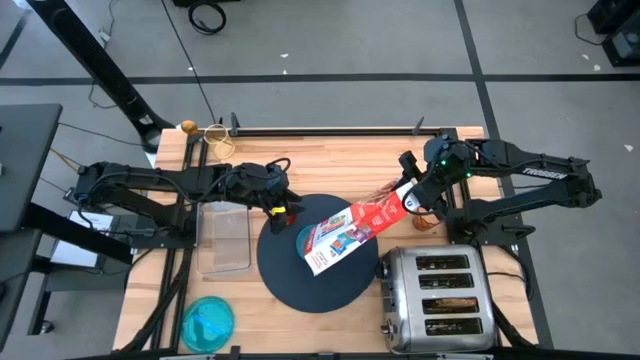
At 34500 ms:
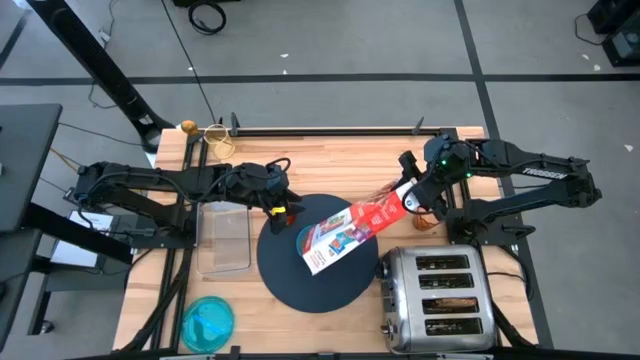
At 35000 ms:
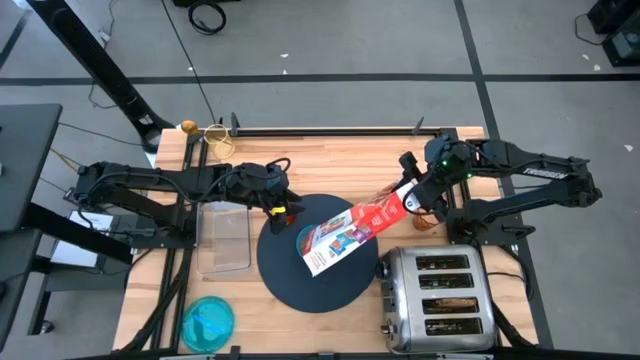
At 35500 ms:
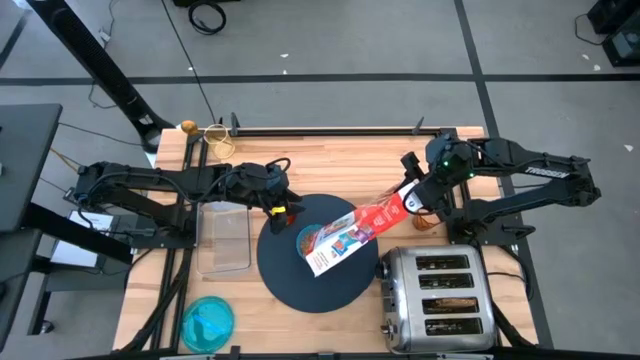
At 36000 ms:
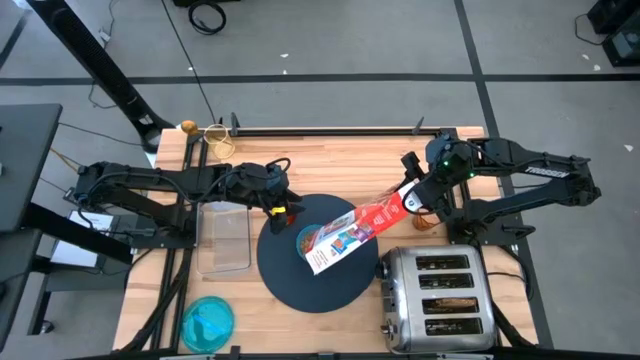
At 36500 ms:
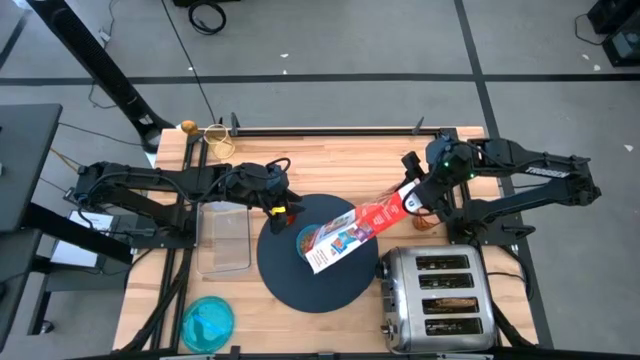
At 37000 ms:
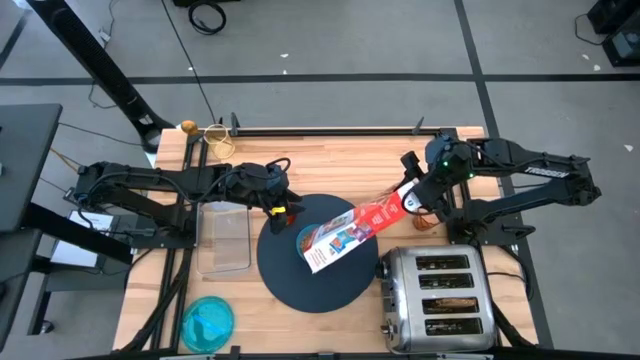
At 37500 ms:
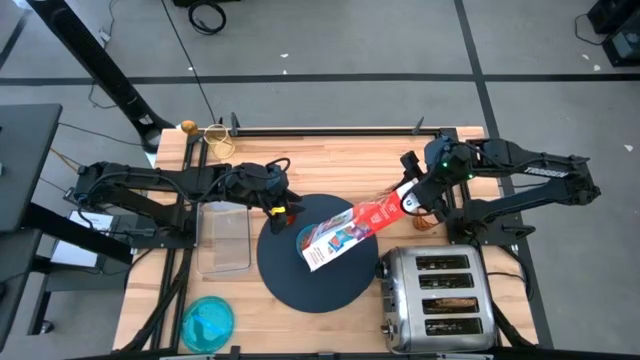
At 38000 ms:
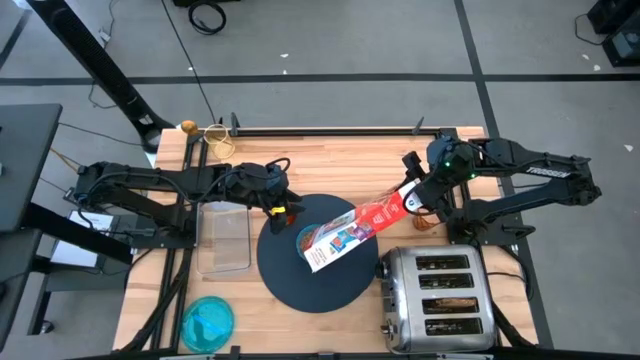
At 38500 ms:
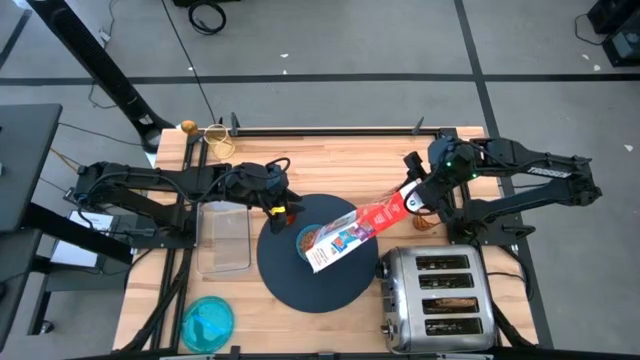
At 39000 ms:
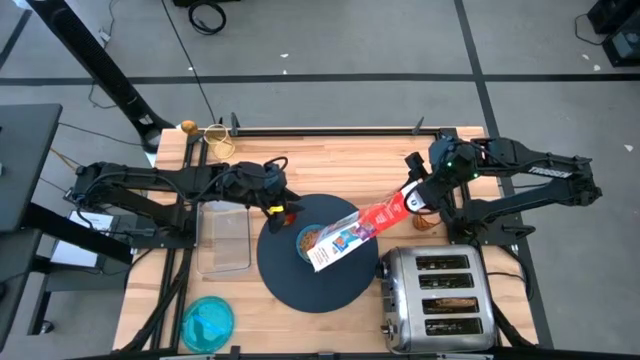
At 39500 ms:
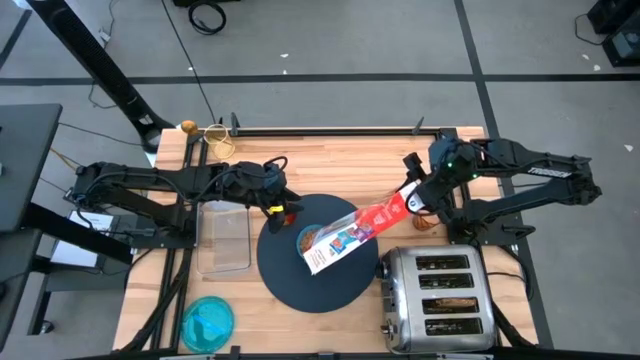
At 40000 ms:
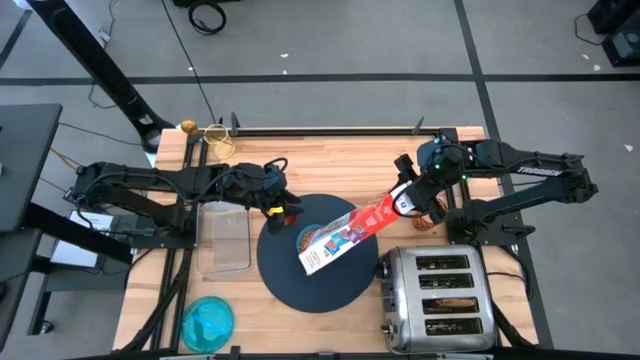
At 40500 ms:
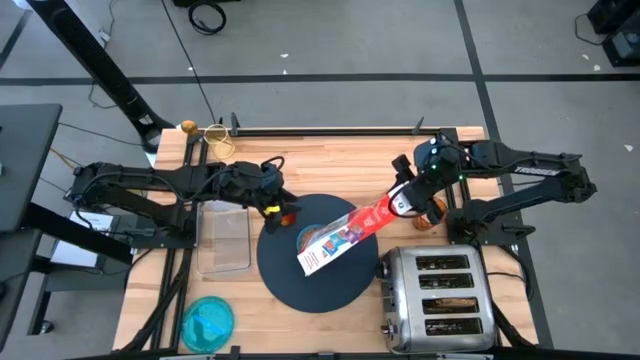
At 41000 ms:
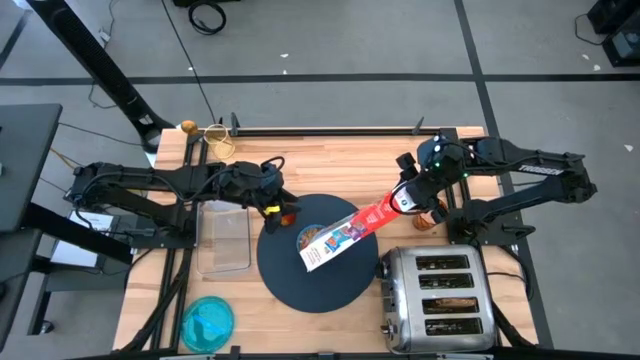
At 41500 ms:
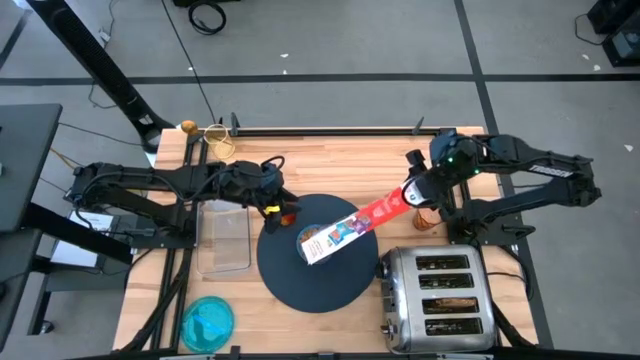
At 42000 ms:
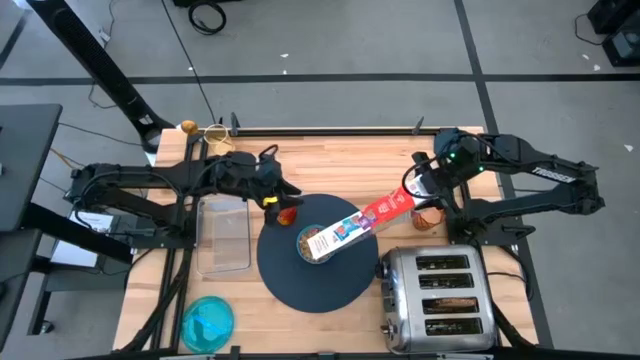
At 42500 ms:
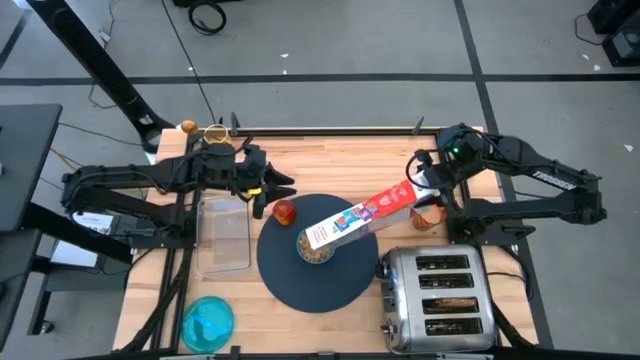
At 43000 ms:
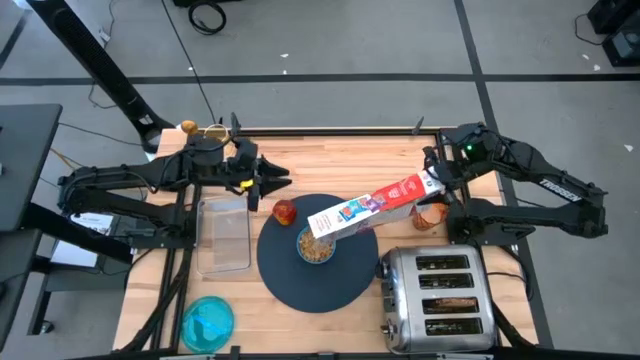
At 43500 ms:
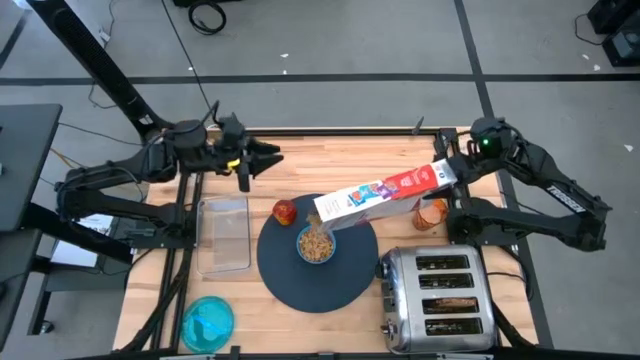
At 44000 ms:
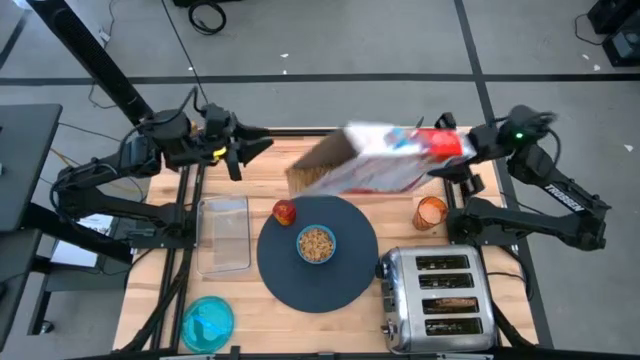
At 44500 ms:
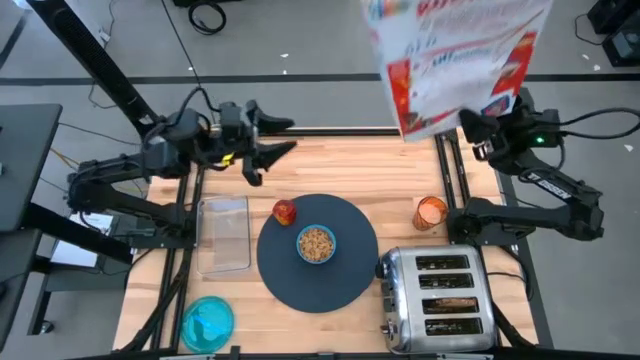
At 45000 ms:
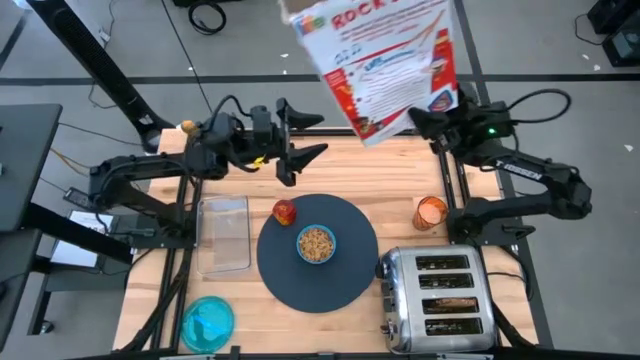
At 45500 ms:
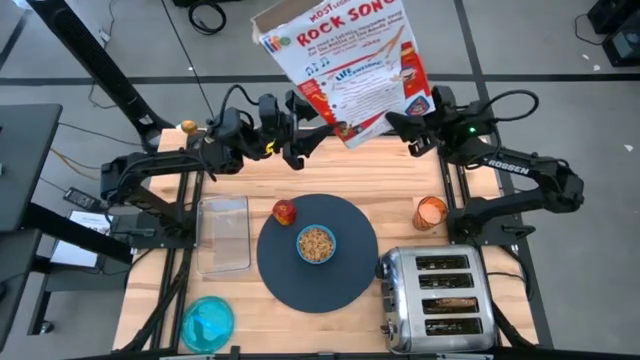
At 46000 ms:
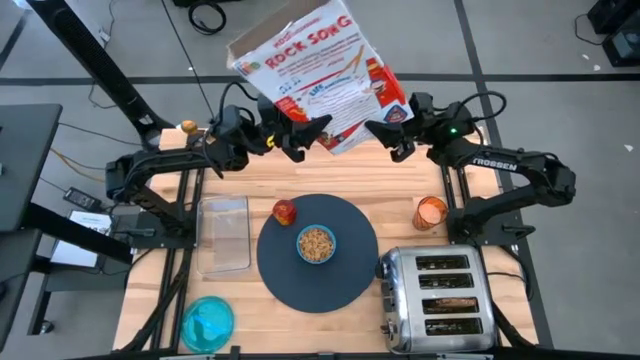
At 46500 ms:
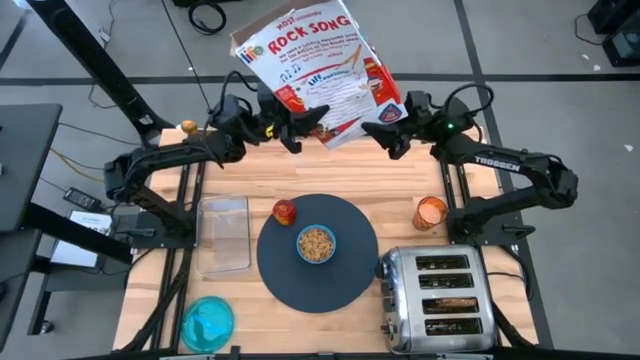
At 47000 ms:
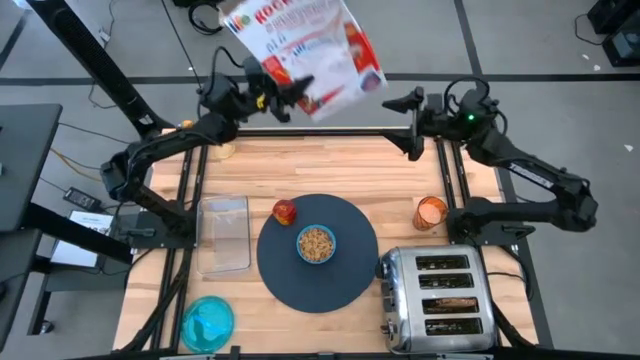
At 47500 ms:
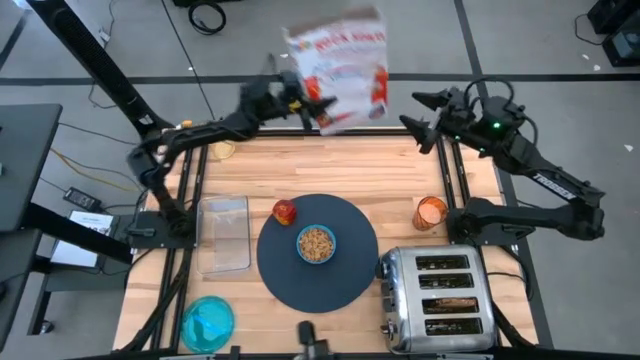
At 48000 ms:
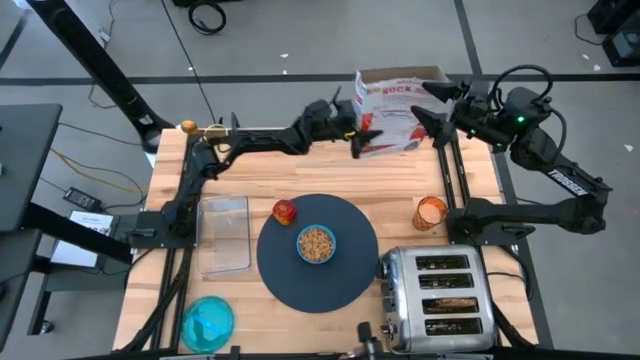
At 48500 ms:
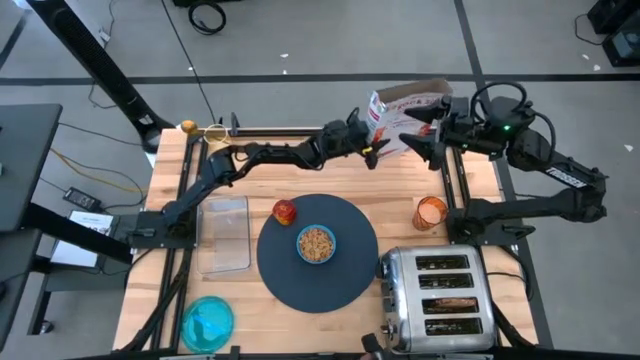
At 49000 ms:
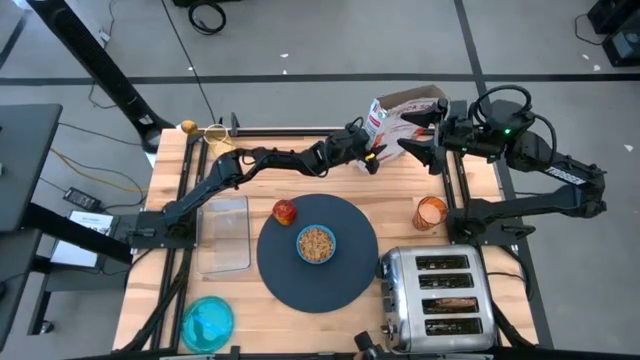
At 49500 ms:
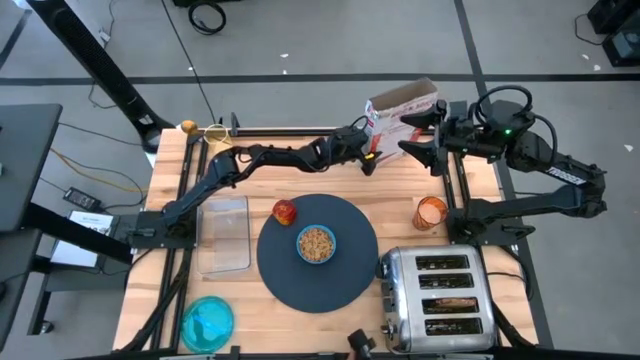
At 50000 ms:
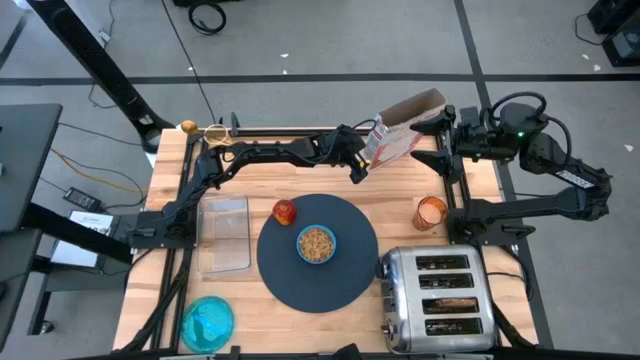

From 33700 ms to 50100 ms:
Task: Arrange a breakfast setting
Pour the cereal into the bowl

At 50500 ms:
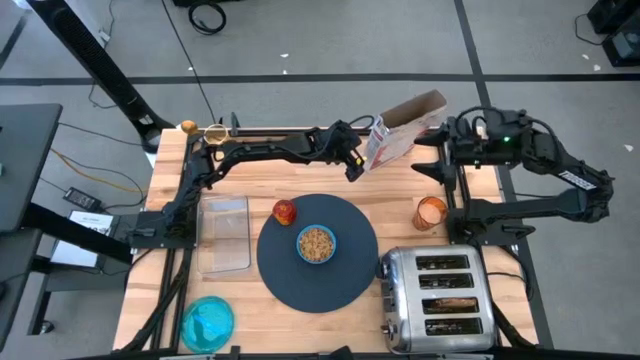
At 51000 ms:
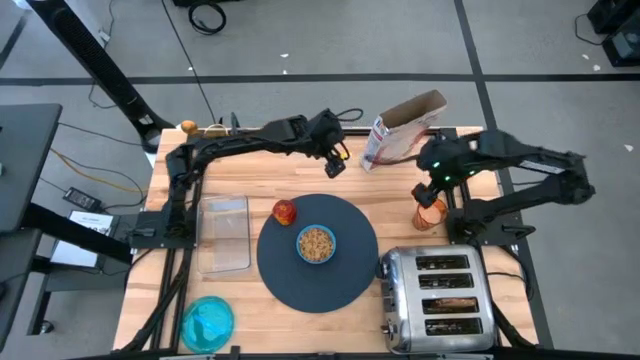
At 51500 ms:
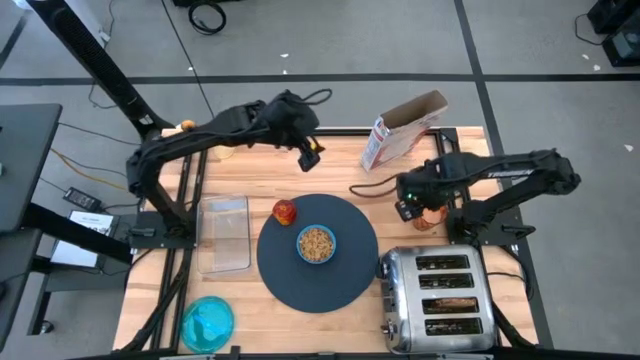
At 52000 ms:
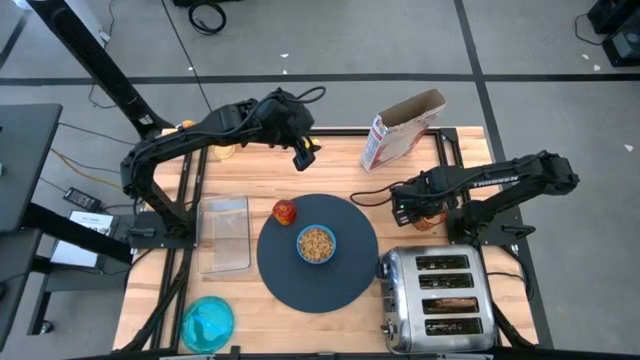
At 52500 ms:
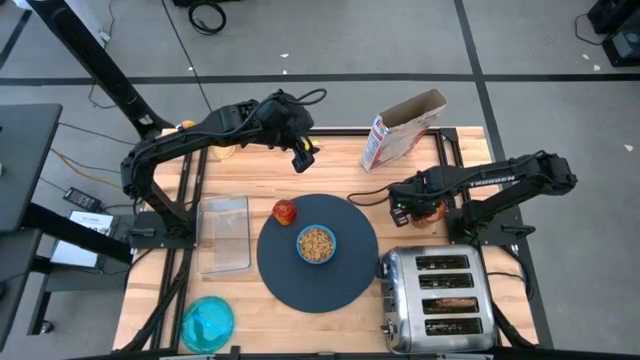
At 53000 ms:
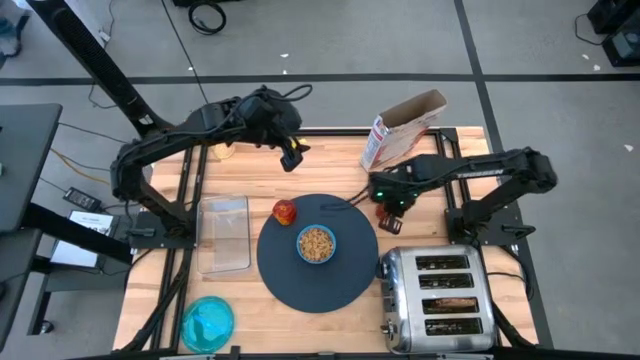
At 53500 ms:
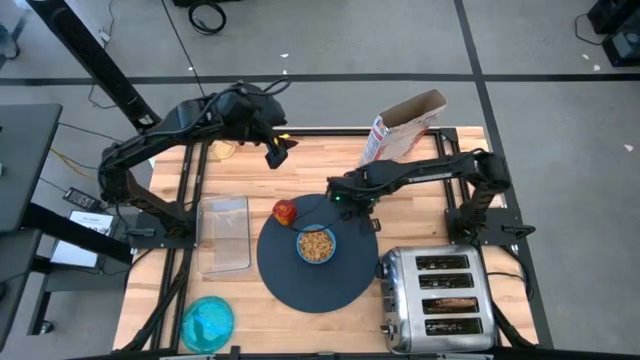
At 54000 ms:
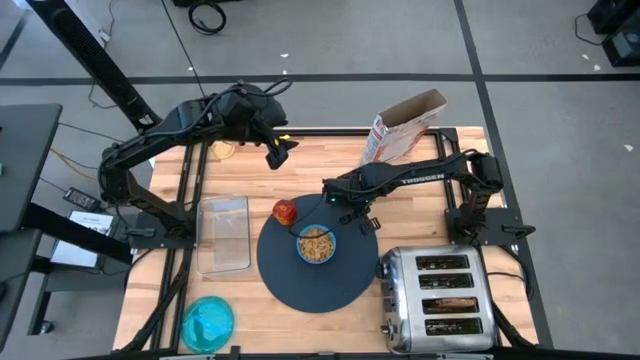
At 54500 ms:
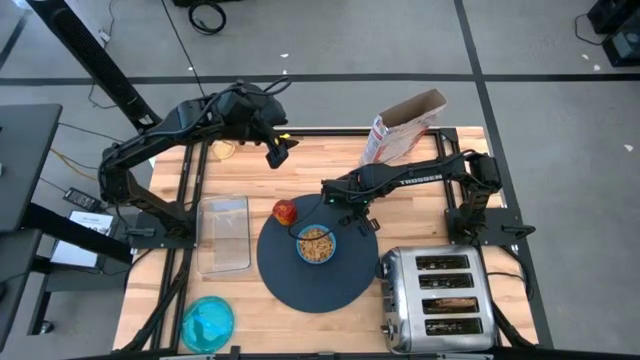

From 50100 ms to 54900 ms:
Put the orange cup on top of the dark blue table placemat beside the blue bowl
